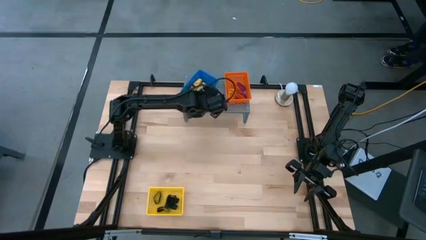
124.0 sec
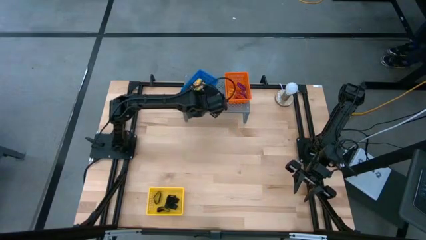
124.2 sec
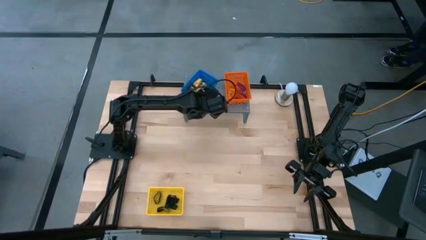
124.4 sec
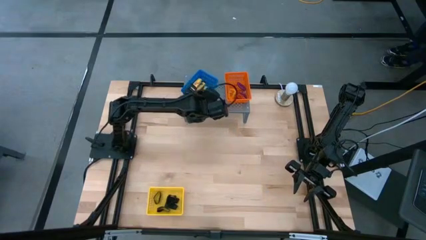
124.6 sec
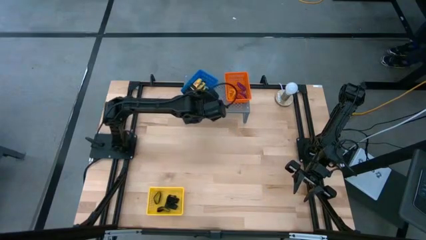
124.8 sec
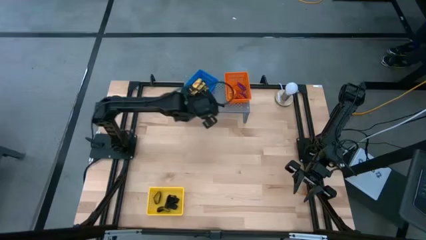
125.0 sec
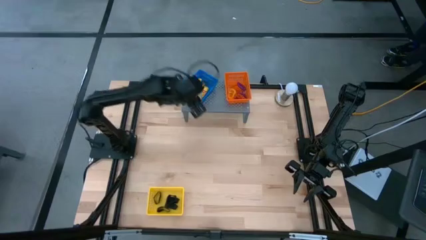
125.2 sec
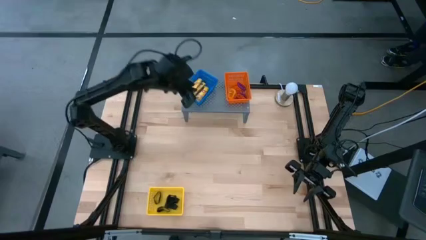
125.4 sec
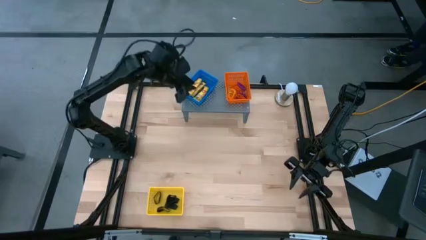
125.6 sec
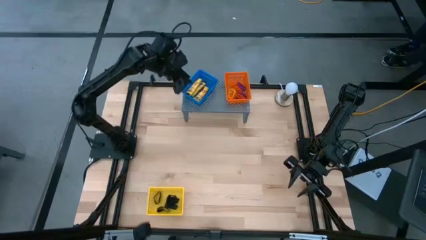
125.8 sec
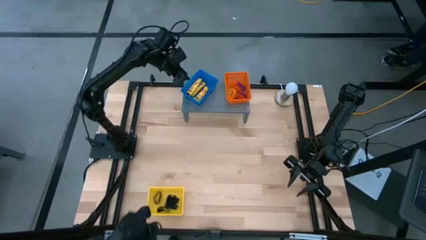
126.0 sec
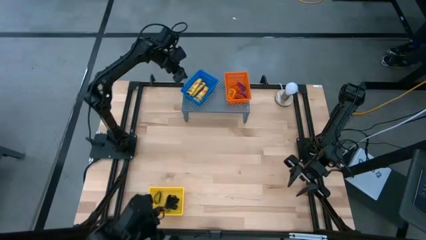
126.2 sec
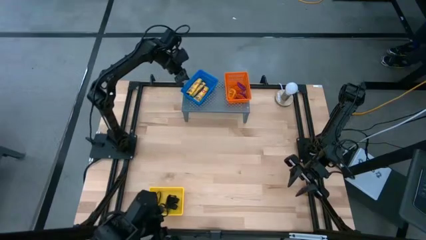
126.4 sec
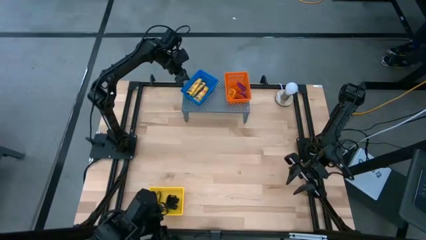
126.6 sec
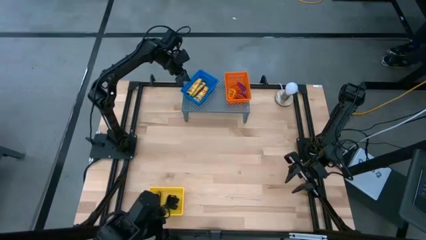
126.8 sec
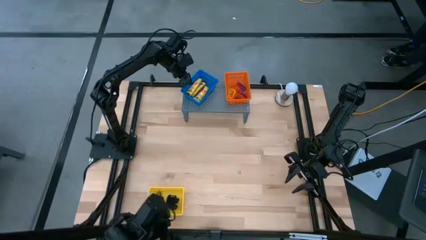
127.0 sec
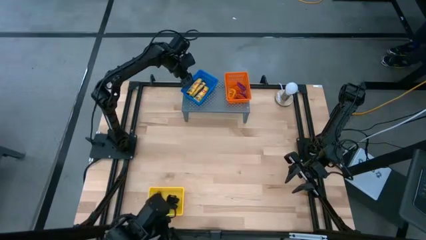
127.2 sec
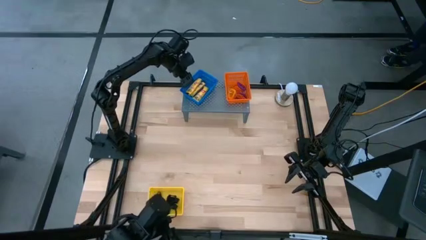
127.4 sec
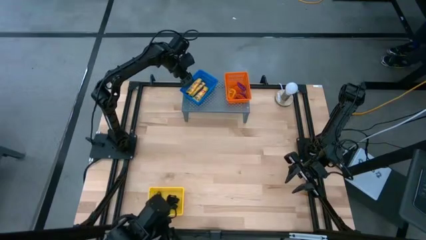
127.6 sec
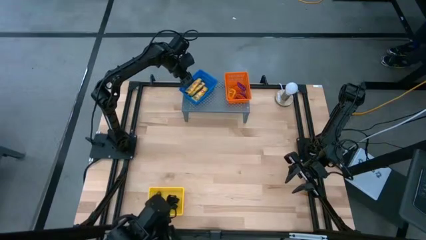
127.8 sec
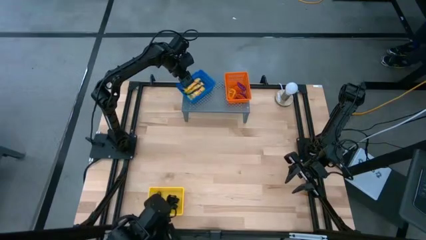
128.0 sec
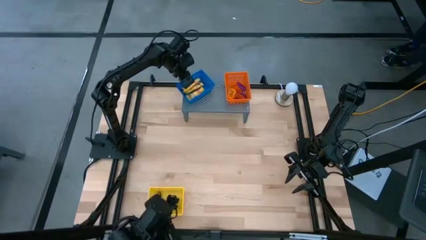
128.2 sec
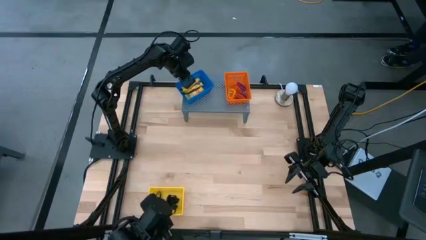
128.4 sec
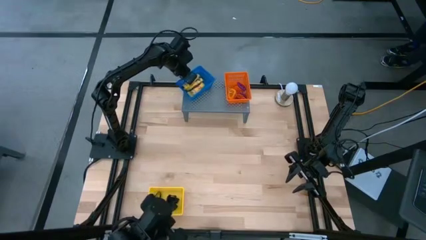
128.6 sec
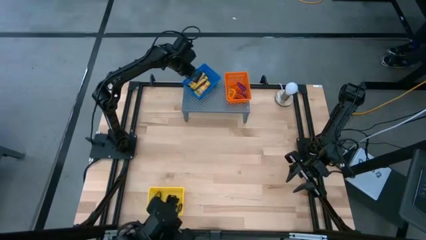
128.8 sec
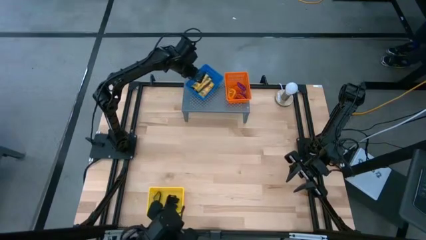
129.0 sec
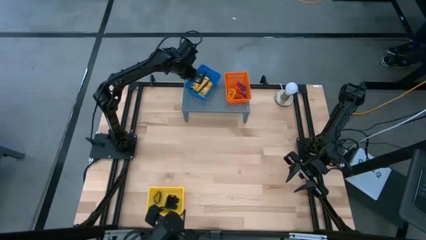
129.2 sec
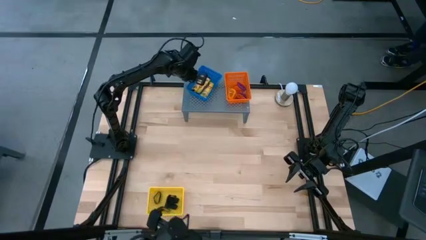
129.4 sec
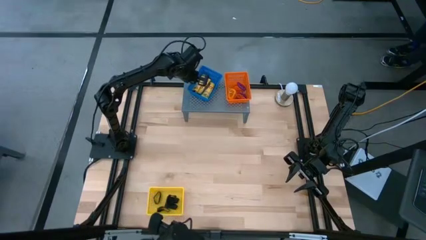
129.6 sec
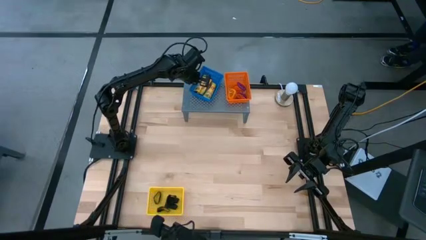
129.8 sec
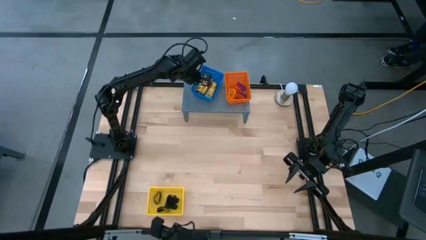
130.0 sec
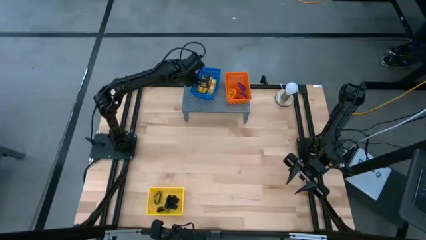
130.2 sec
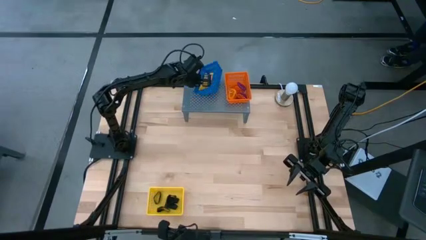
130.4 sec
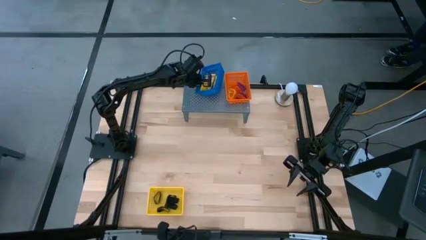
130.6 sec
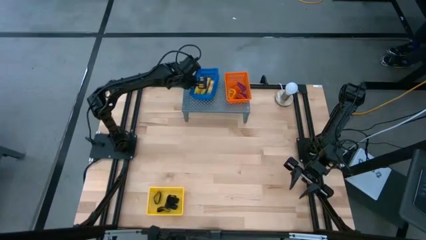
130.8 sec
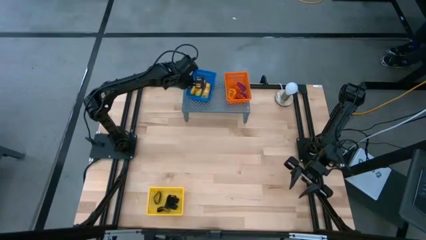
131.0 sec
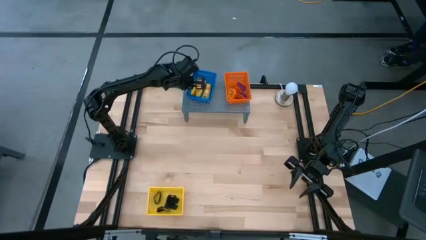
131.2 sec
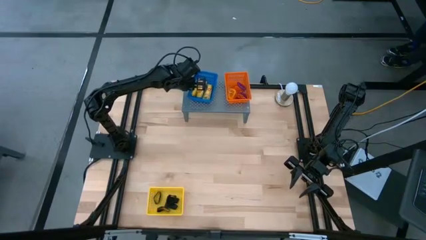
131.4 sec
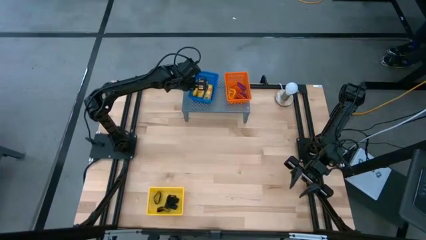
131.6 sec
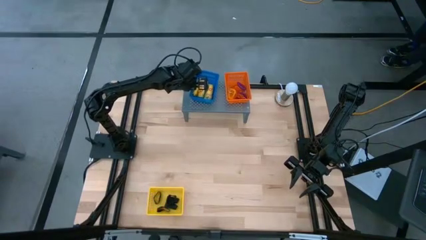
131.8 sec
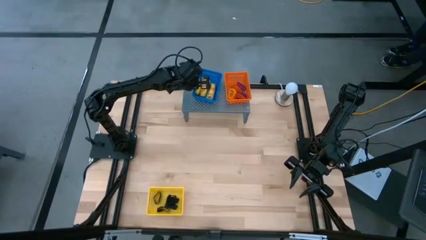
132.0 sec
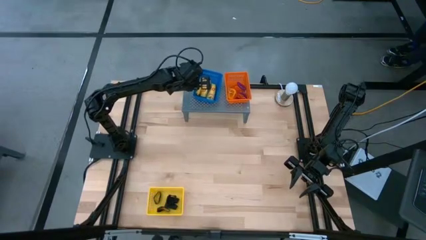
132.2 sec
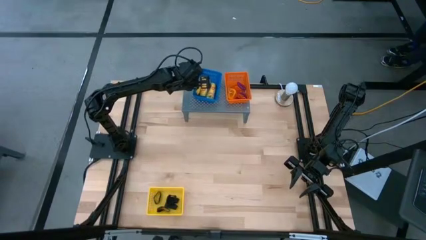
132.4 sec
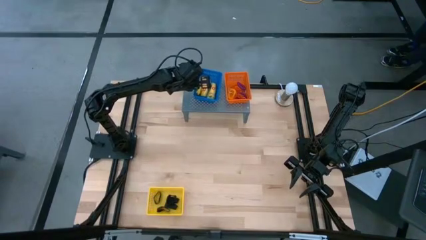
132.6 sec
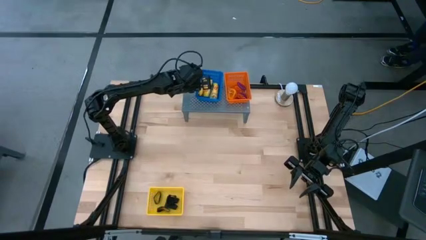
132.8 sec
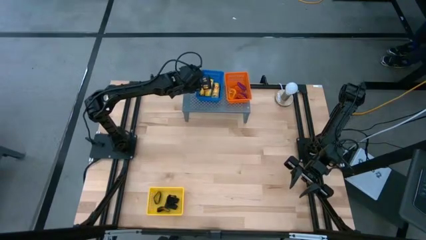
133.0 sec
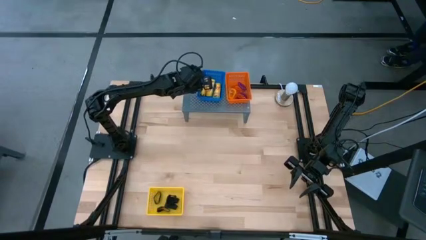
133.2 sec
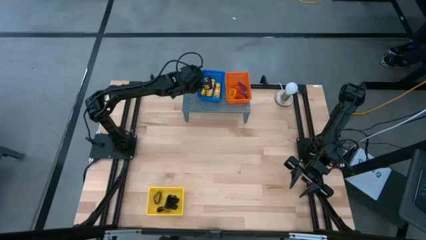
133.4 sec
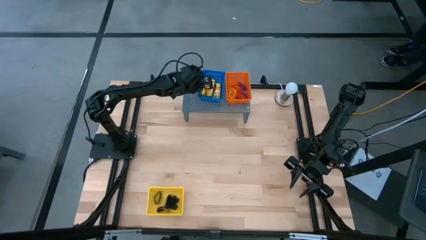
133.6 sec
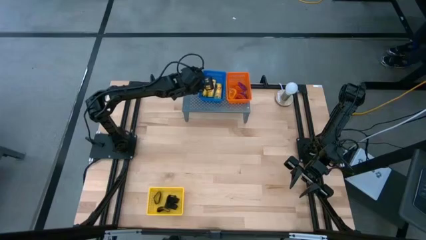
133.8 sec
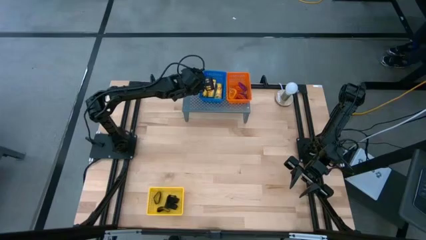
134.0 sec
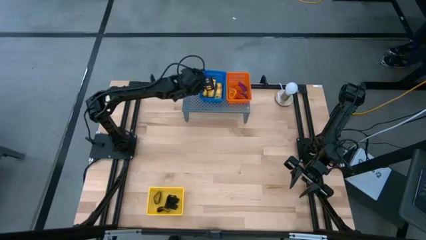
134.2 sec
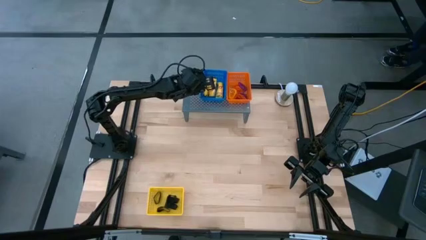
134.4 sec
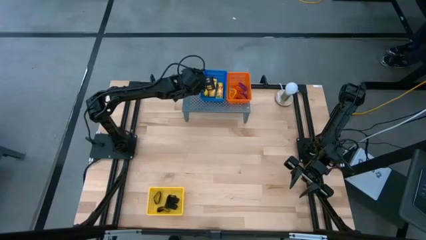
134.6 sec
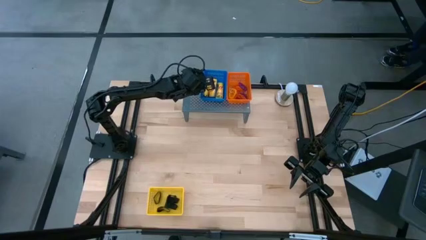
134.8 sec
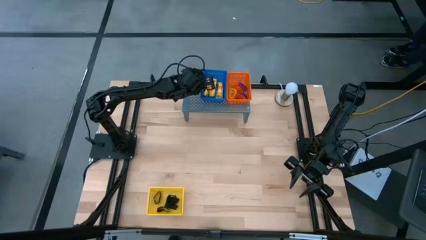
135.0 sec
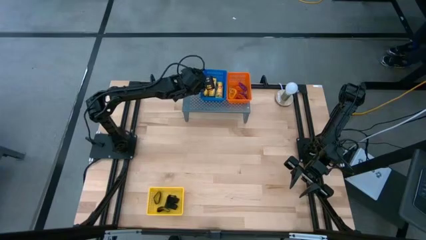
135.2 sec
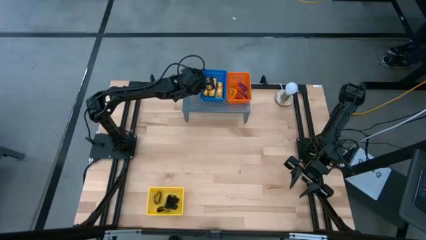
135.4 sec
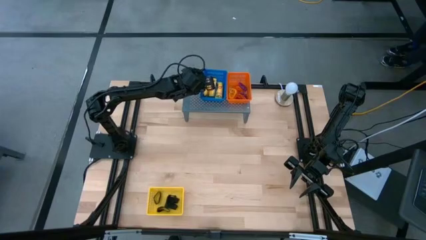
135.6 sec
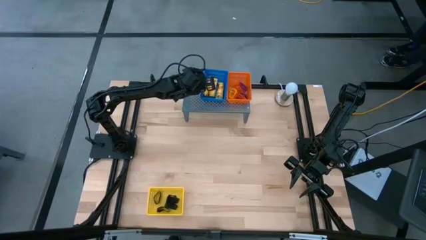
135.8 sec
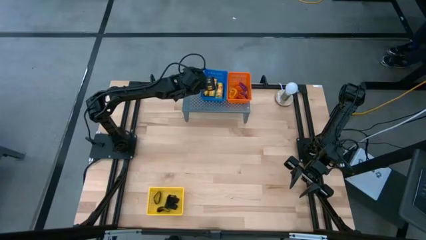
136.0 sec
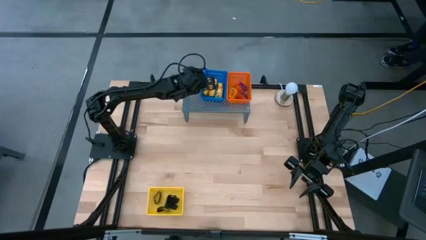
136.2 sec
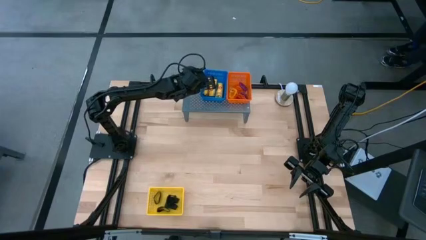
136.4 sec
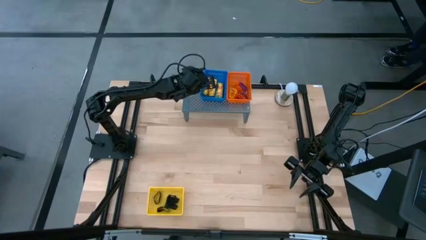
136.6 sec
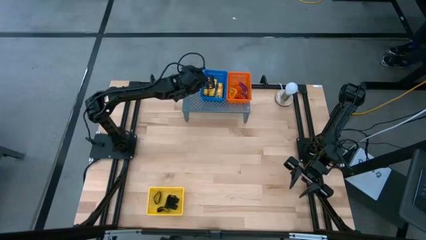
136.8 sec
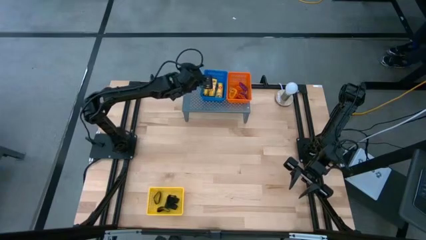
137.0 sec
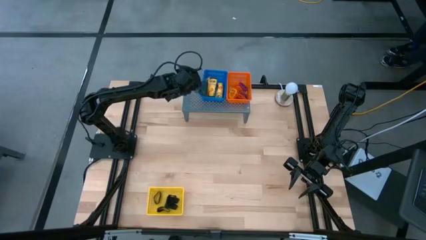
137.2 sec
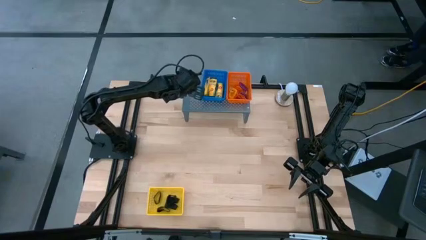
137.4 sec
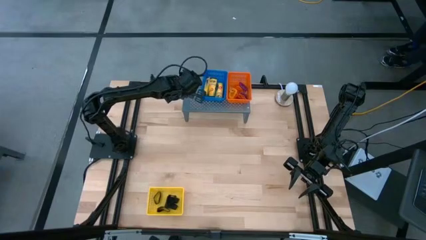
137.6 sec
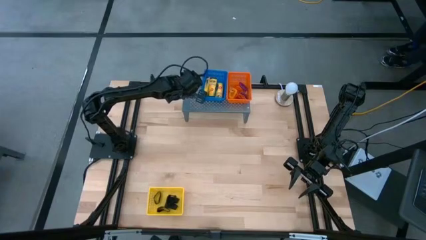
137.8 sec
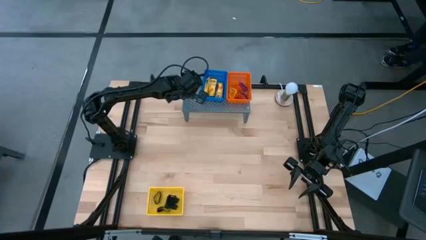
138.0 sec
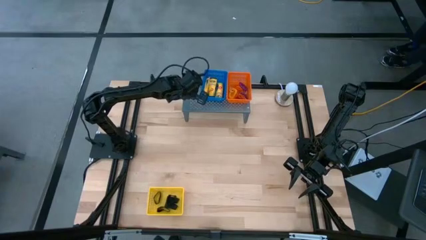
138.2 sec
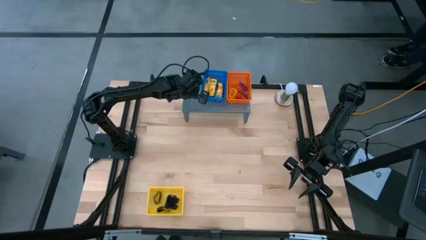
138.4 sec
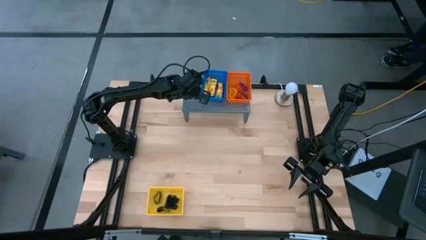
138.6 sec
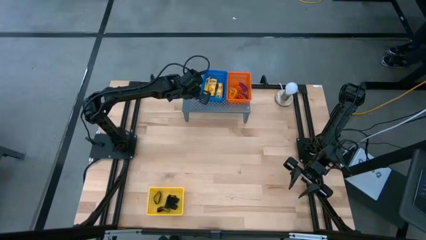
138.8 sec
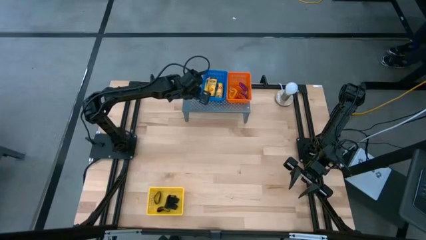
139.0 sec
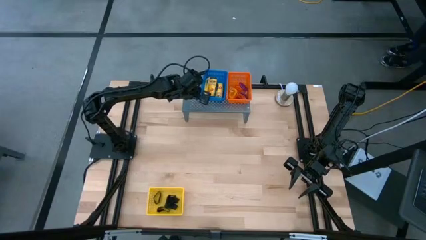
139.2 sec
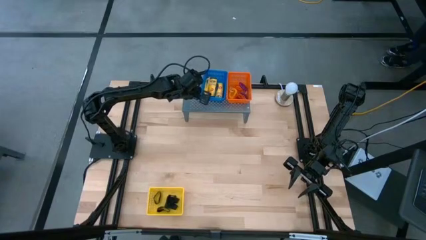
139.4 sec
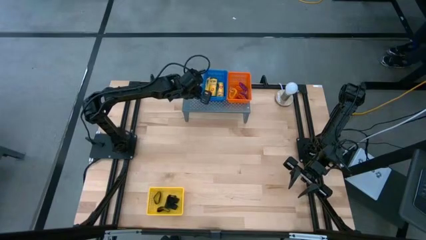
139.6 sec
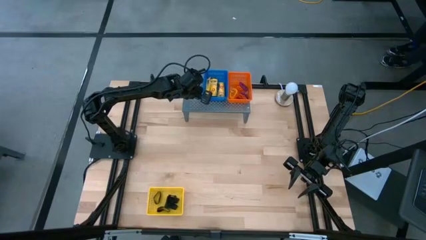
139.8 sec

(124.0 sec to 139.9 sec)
Task: Pick & Place Office Desk Supplies
Put the blue basket onto the shelf
